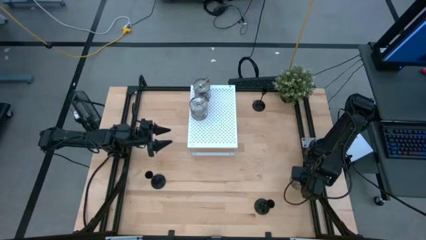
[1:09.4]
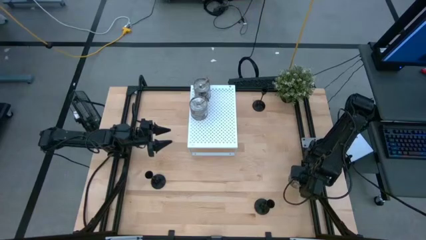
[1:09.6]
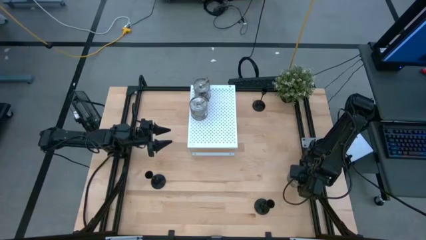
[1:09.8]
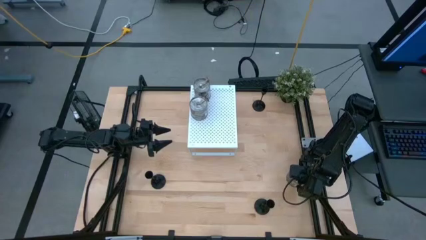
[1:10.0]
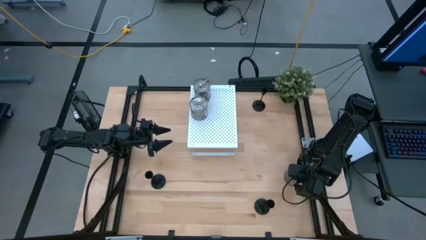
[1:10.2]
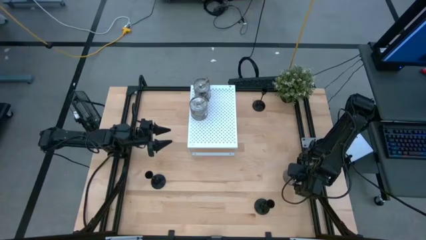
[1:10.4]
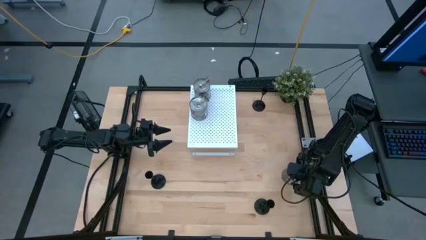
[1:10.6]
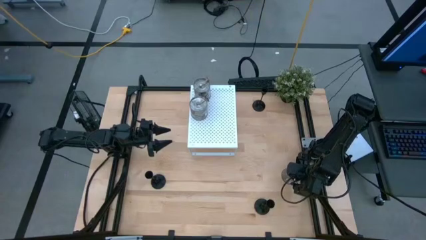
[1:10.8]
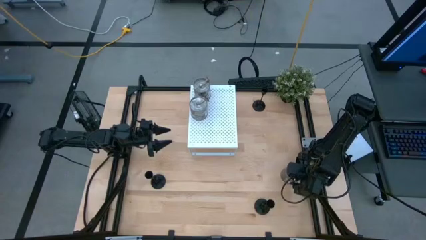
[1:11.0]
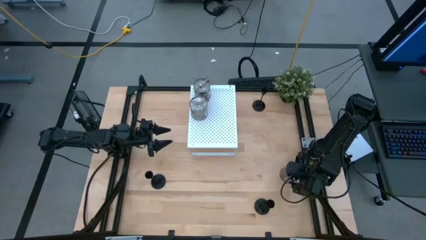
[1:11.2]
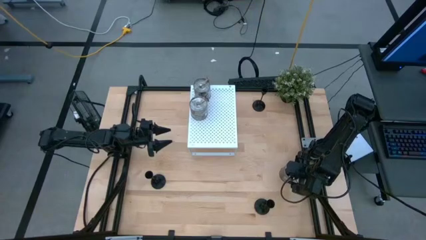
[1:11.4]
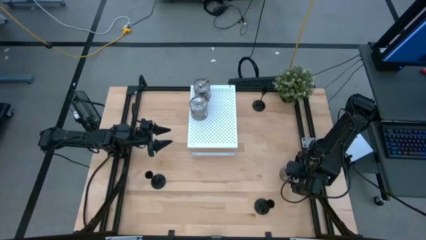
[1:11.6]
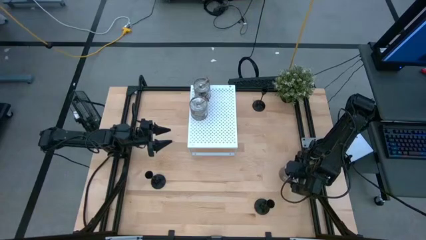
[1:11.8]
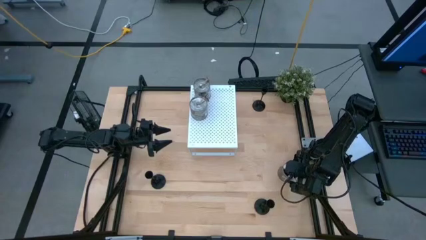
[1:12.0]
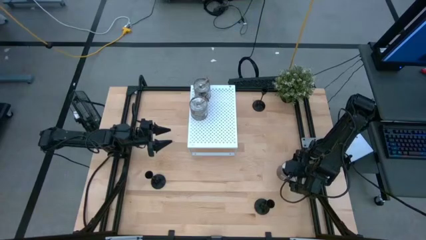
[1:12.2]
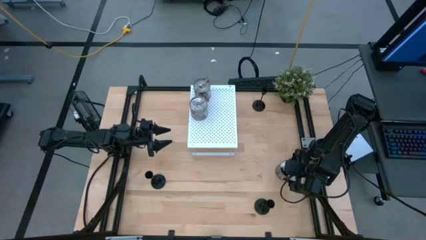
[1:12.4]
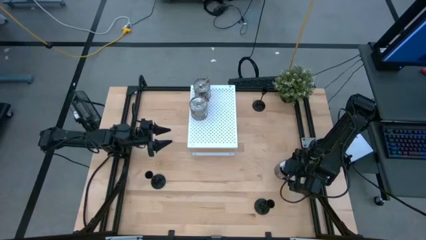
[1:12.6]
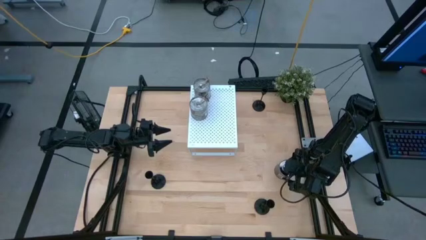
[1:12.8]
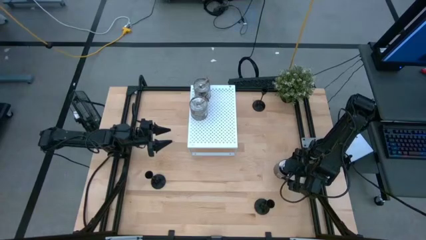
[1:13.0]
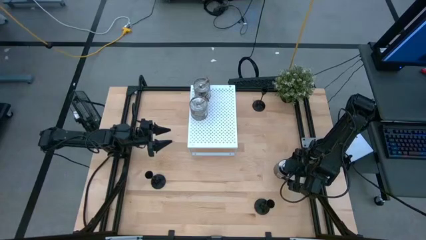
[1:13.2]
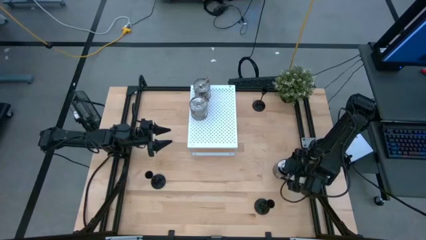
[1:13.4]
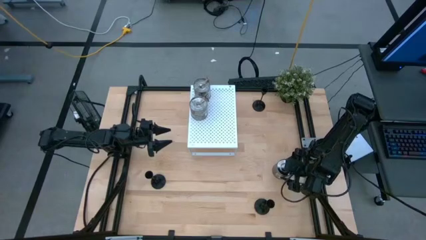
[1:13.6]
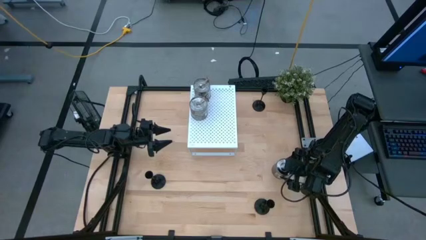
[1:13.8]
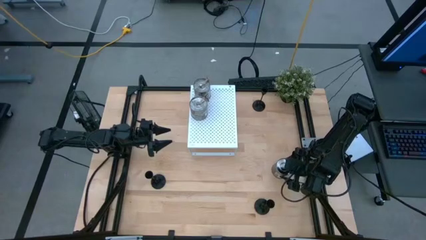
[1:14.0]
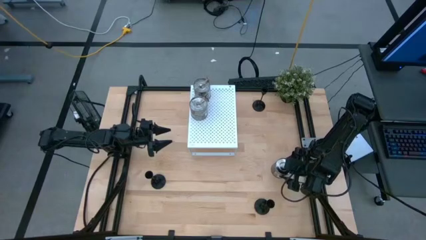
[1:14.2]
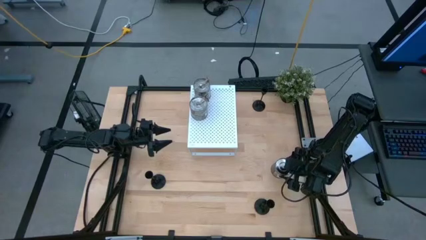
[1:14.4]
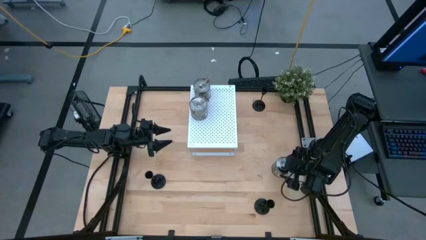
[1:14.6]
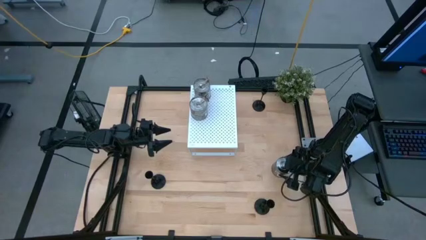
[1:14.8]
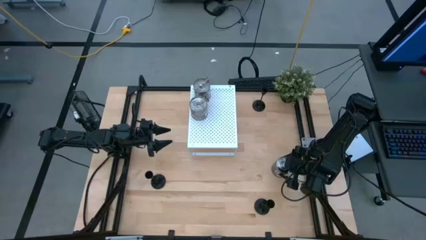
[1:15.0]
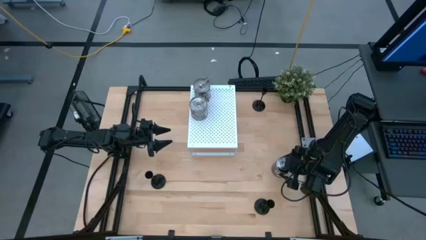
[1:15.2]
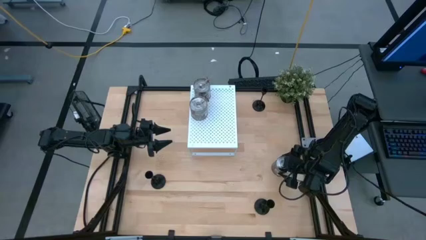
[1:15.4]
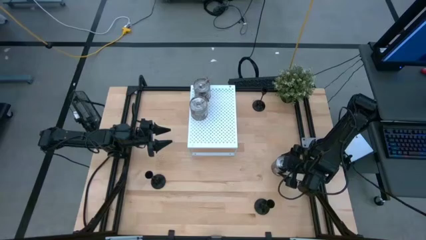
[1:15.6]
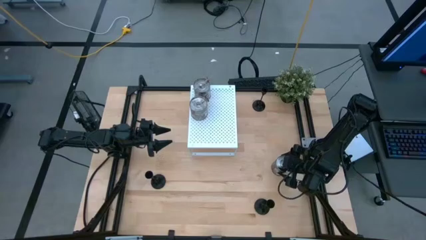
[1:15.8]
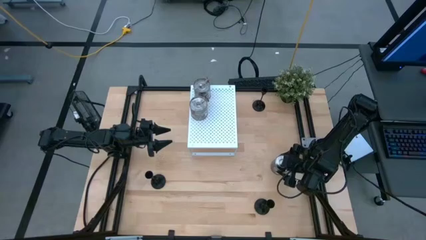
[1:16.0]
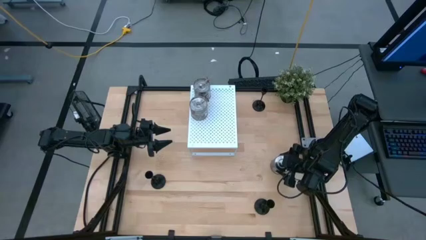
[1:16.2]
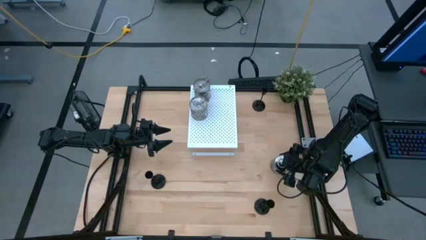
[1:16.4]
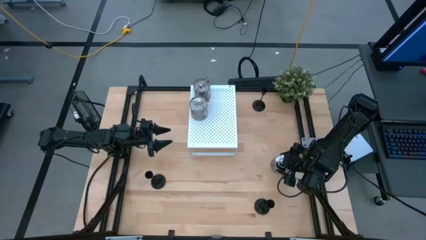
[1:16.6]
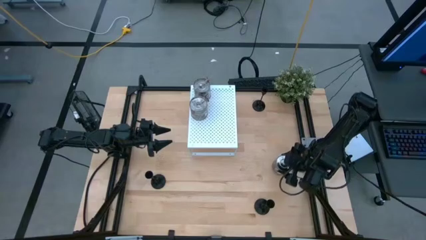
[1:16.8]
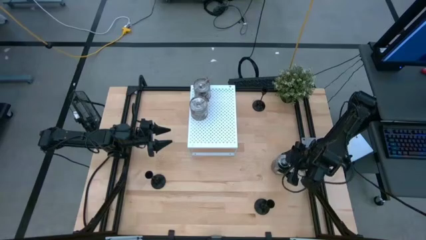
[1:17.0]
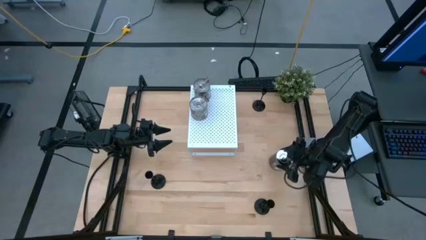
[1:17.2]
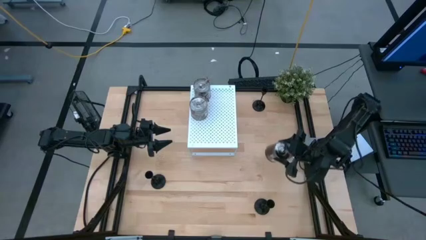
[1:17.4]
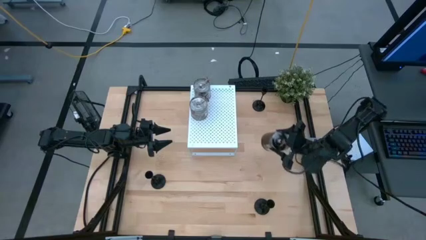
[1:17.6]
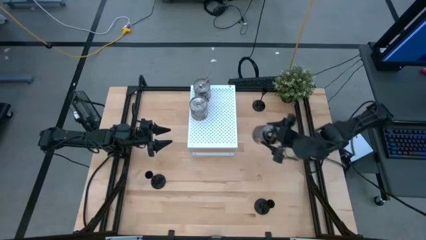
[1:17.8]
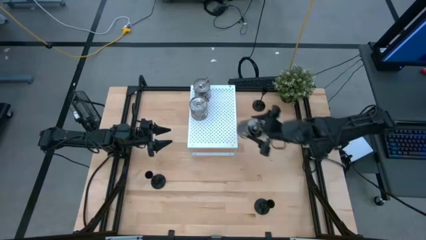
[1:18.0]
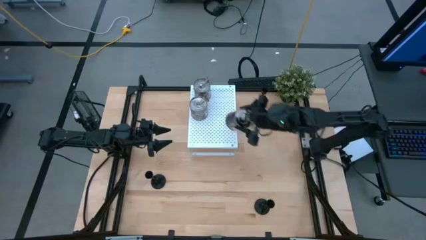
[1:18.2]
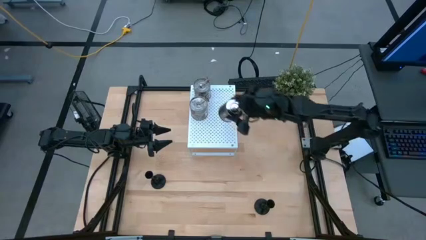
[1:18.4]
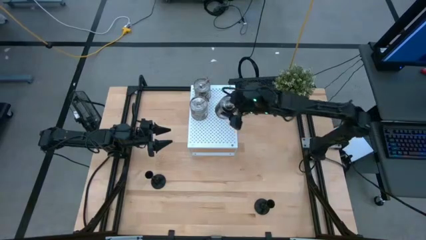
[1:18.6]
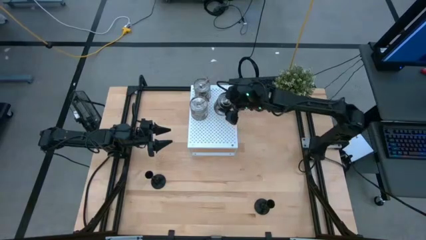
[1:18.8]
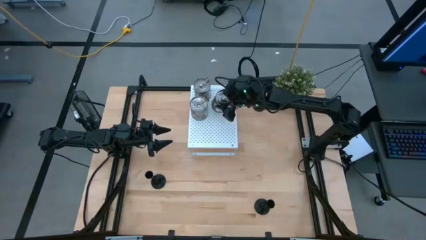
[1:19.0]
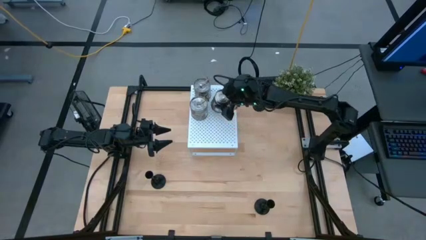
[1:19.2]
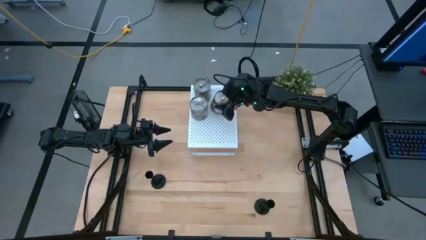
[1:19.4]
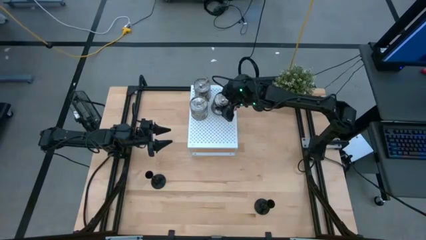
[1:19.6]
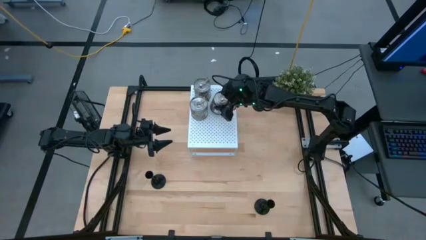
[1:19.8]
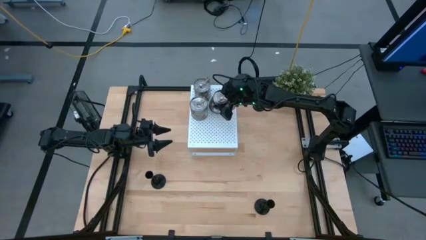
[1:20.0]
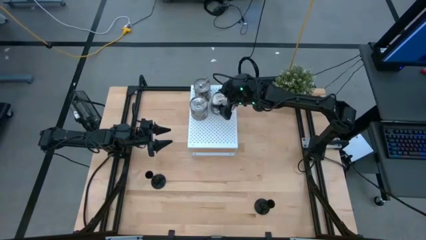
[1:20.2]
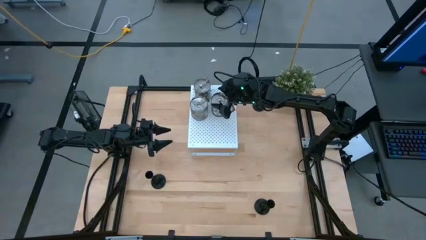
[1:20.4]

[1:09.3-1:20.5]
Task: Pick & Place candle stick holders
Put the silver scented candle on the shelf

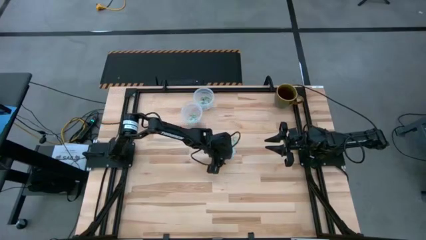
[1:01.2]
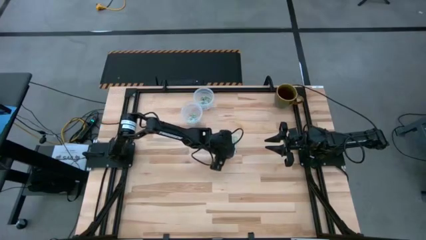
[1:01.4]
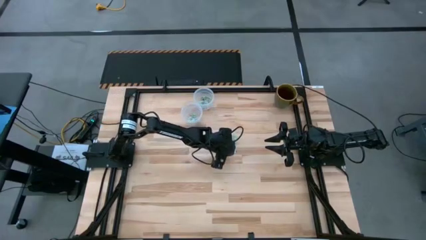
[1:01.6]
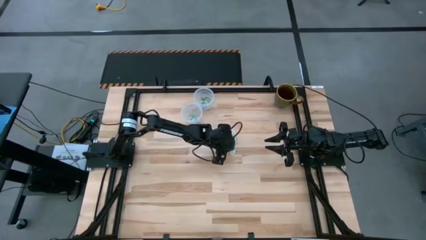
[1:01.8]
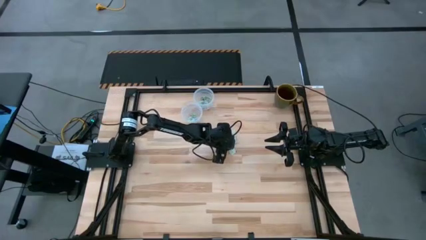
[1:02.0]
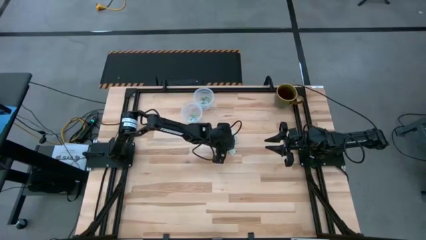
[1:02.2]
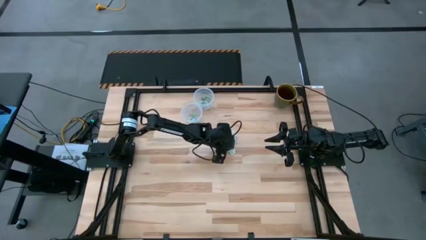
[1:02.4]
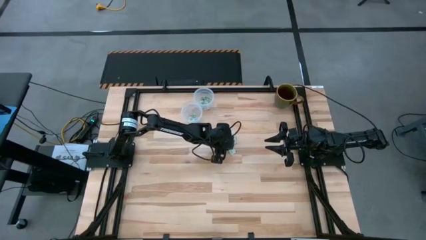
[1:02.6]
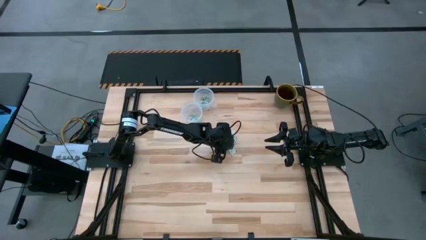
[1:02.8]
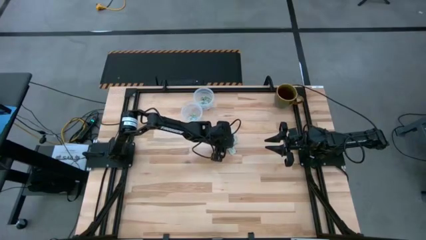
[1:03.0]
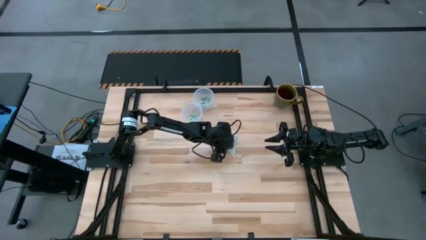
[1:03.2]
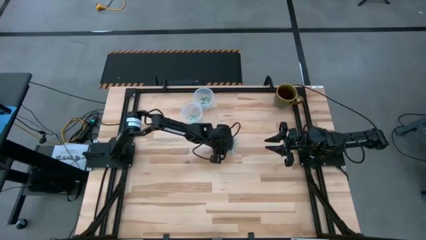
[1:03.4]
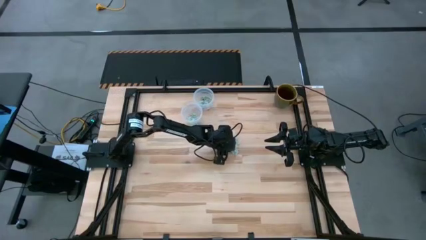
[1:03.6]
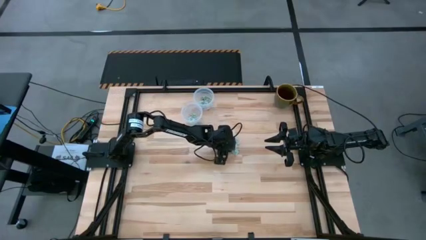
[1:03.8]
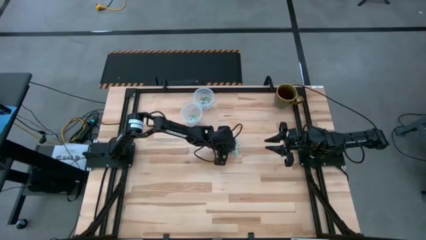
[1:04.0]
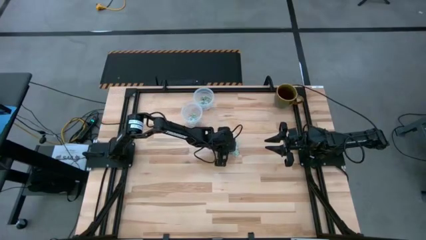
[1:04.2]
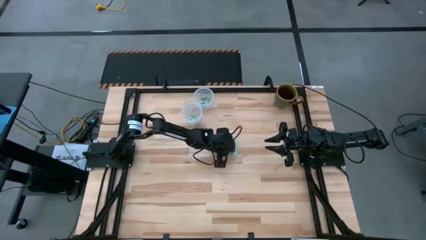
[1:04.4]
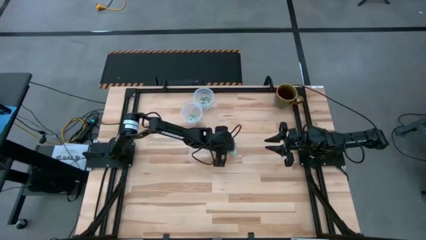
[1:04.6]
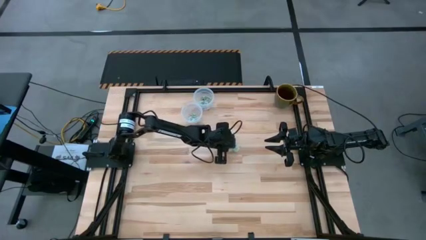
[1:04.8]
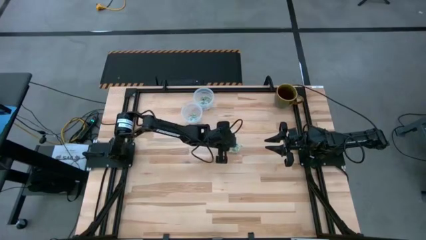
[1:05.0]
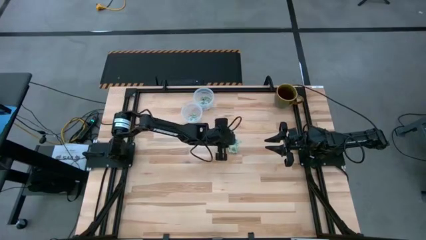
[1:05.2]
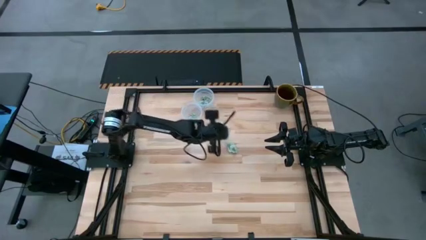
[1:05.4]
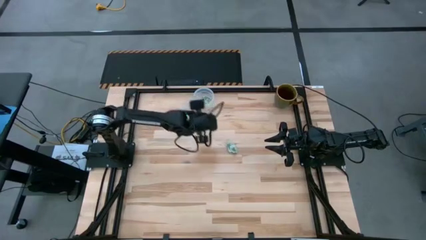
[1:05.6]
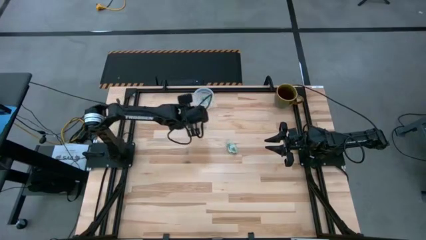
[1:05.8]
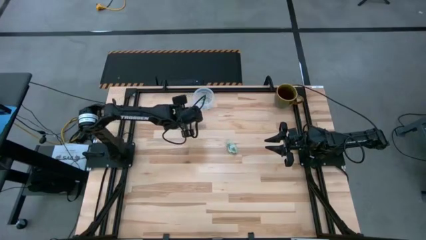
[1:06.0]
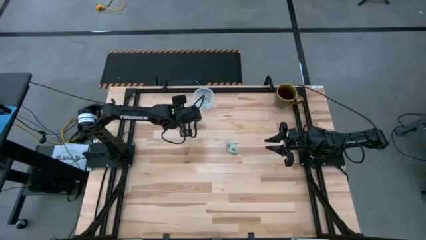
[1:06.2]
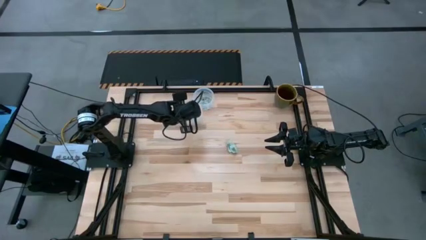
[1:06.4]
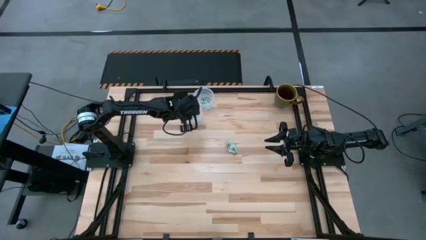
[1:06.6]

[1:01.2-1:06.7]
Task: Pick and place items into bin
Put the bottom stevia packet into the bottom bin
